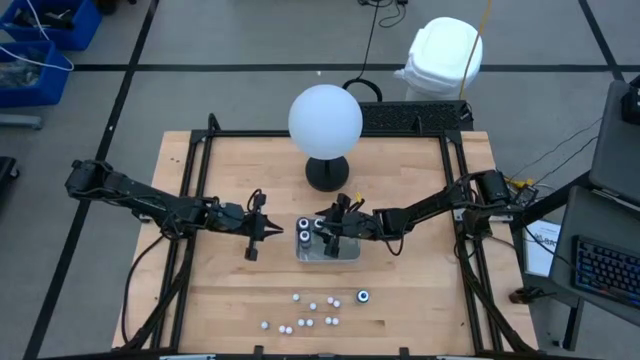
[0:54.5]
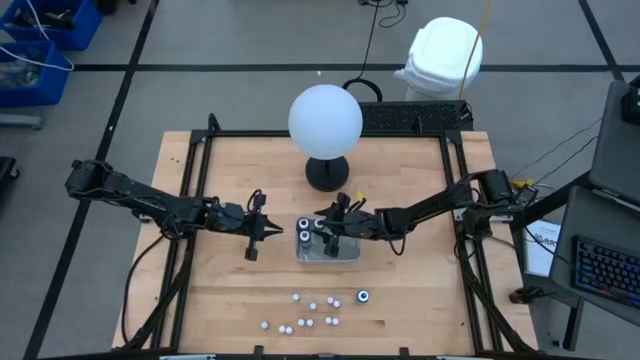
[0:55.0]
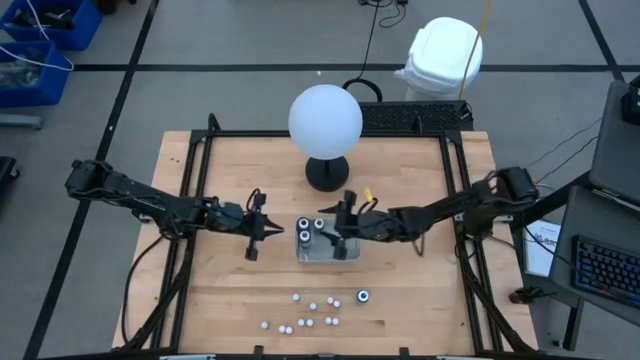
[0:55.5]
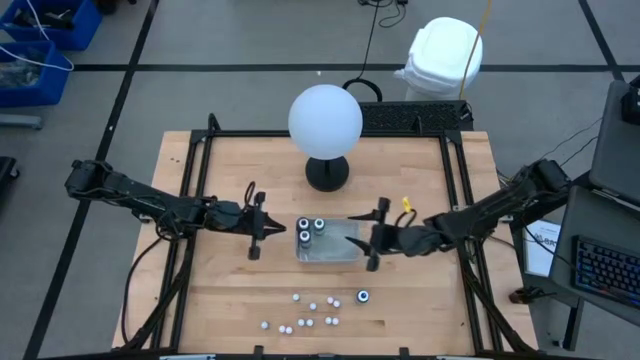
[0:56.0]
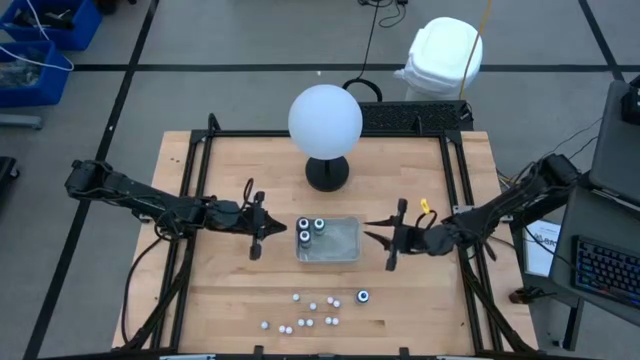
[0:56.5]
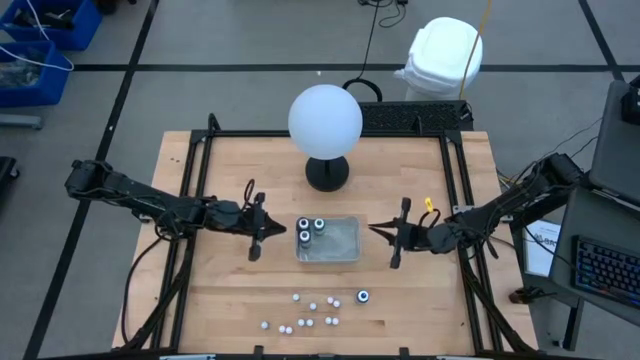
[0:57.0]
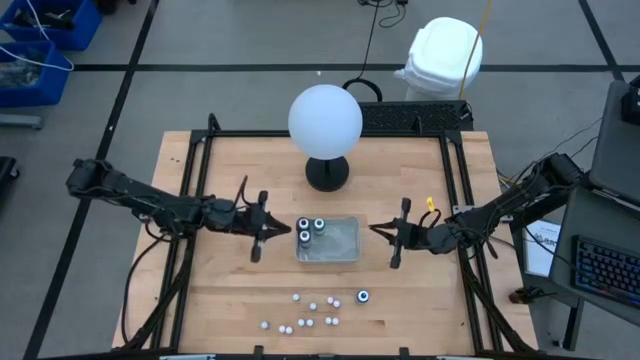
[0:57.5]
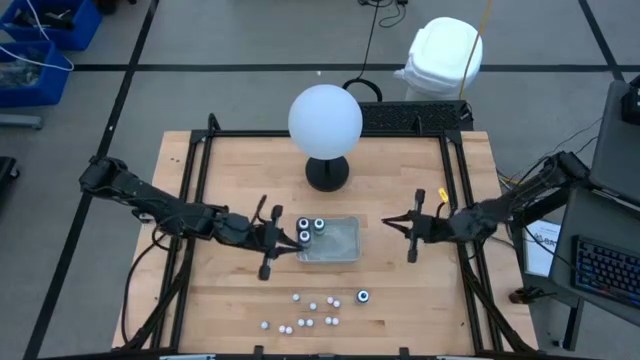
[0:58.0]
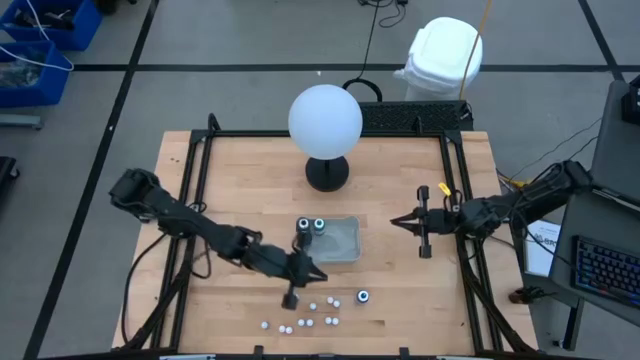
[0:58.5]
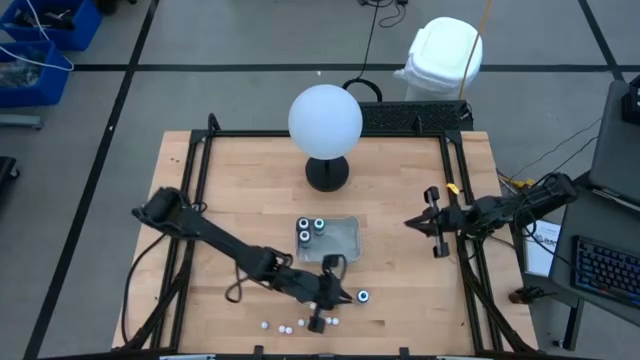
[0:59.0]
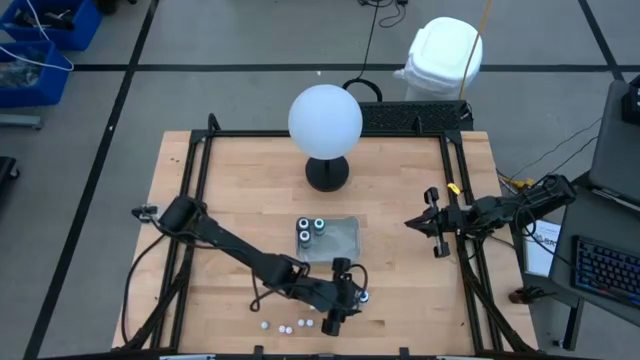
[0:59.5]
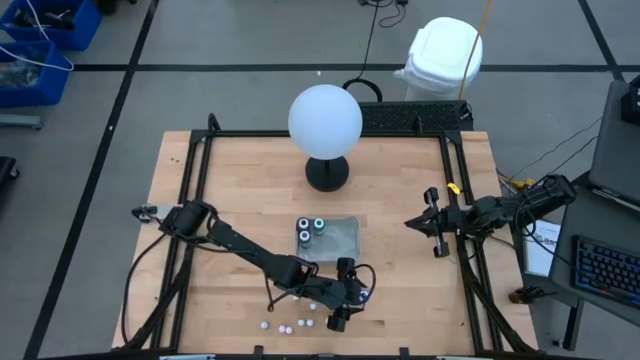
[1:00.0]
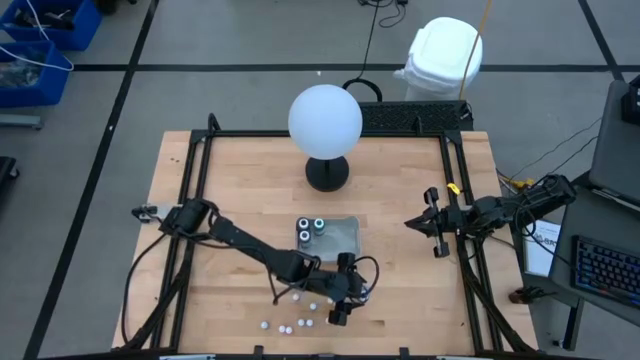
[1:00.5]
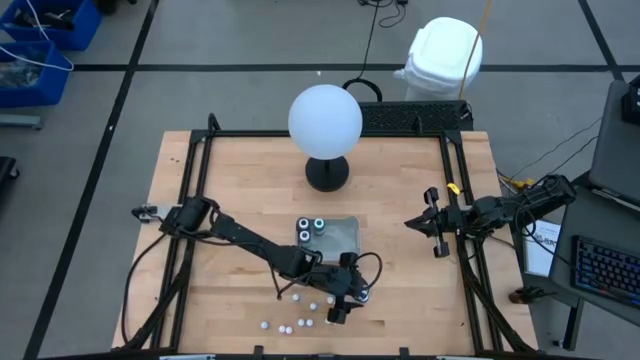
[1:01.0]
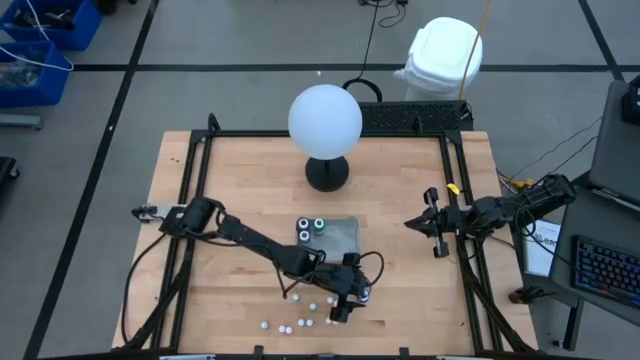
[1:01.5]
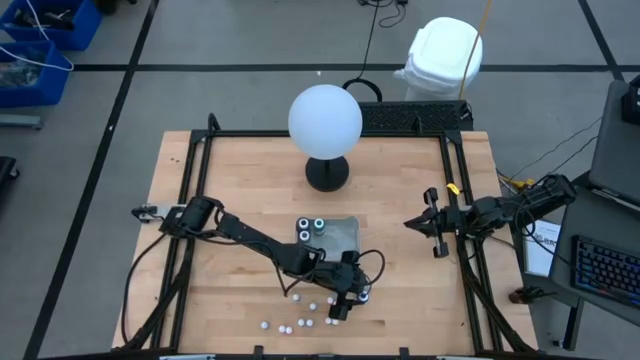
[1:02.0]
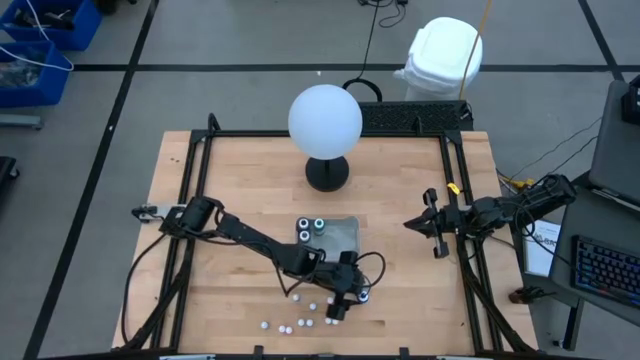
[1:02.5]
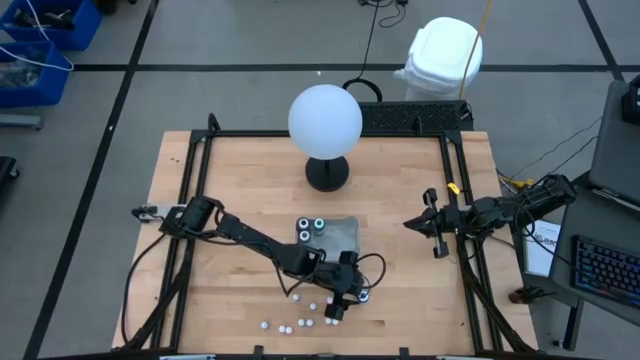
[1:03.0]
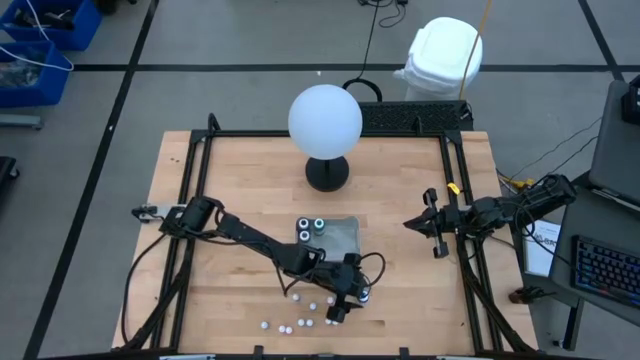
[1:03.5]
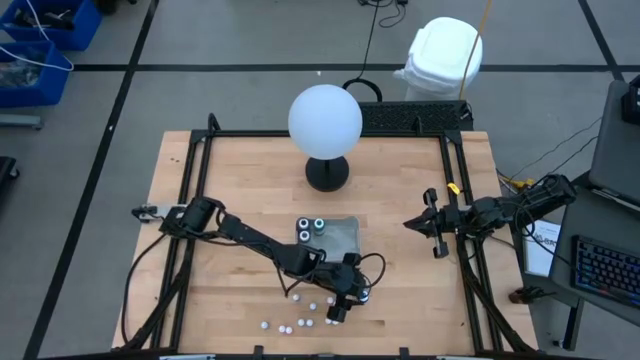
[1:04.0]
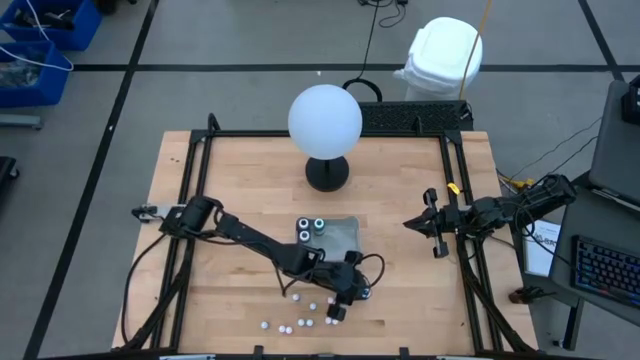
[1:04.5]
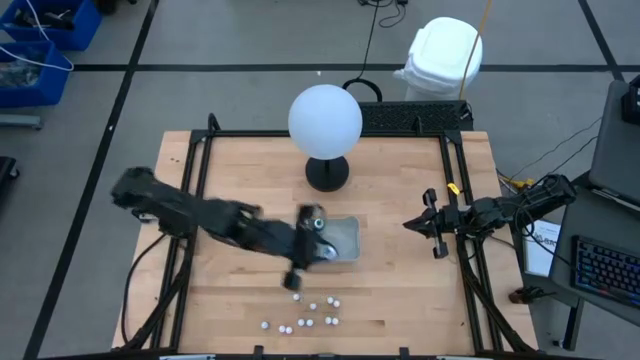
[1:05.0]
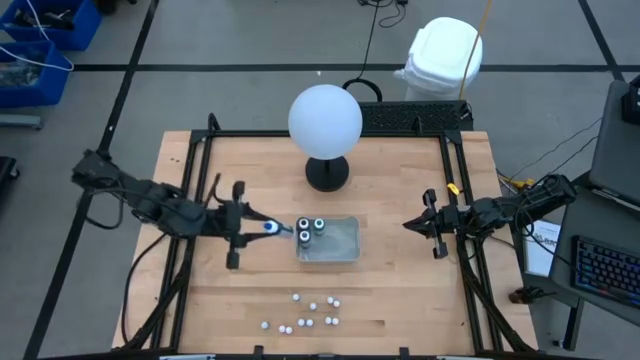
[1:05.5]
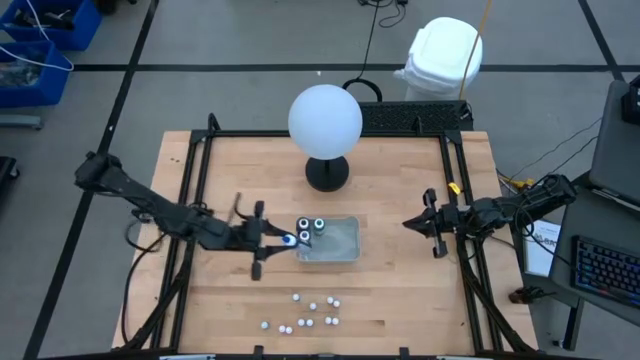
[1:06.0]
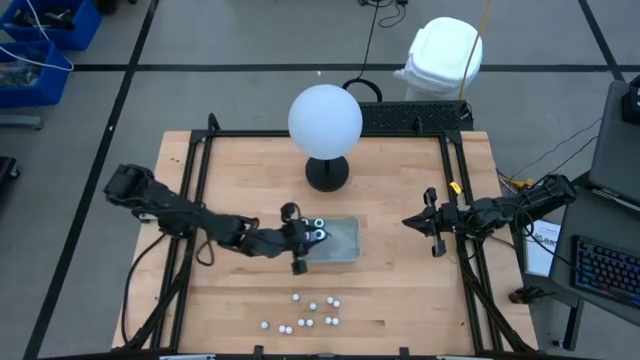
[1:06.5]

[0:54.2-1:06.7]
Task: Pick & Place food coloring
Put the large blue food coloring bottle into the gray bin

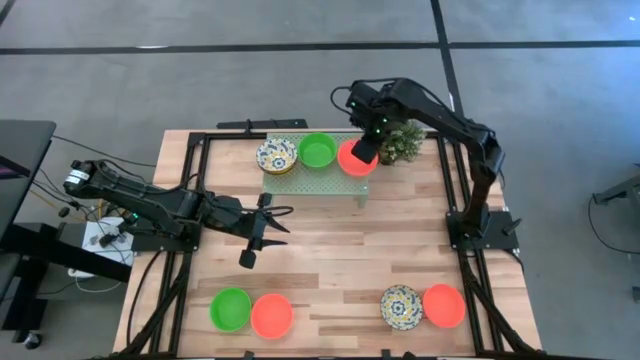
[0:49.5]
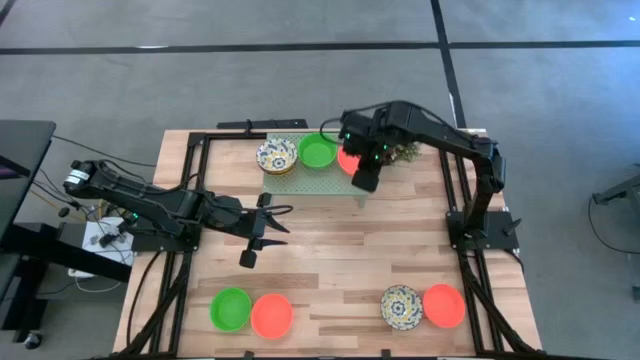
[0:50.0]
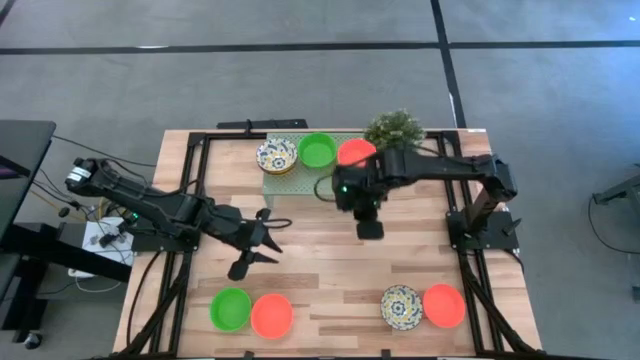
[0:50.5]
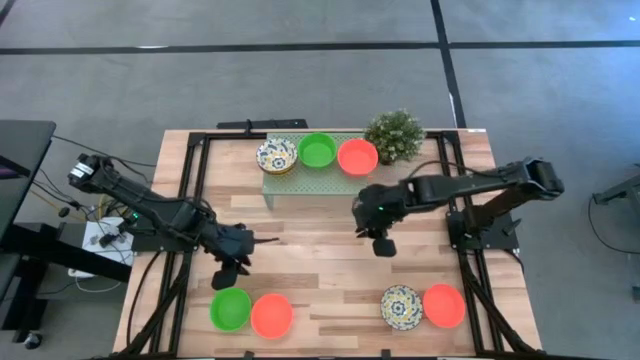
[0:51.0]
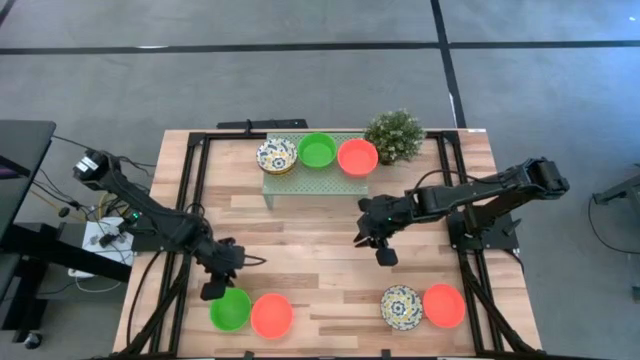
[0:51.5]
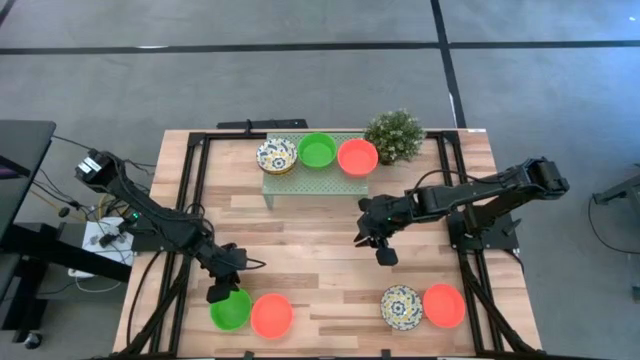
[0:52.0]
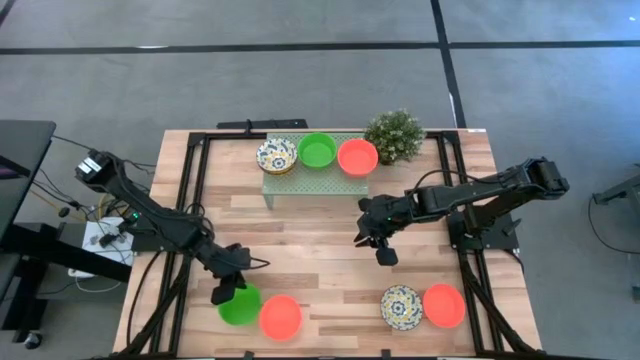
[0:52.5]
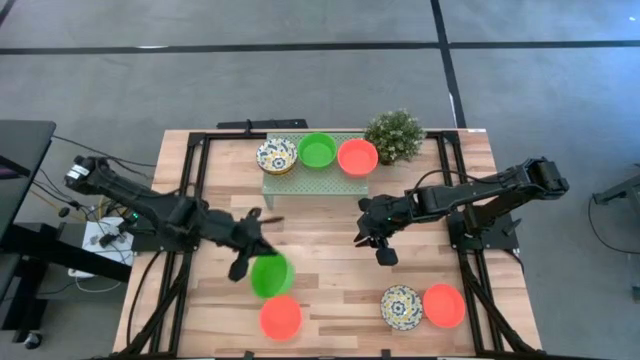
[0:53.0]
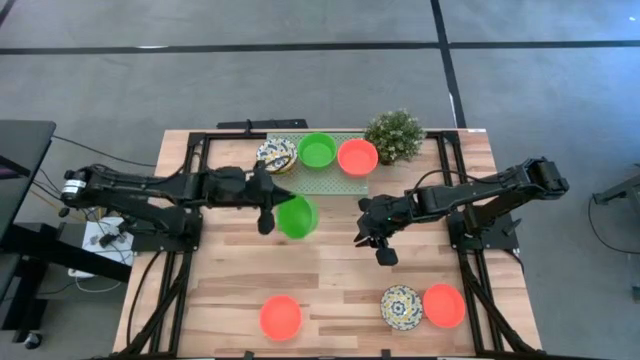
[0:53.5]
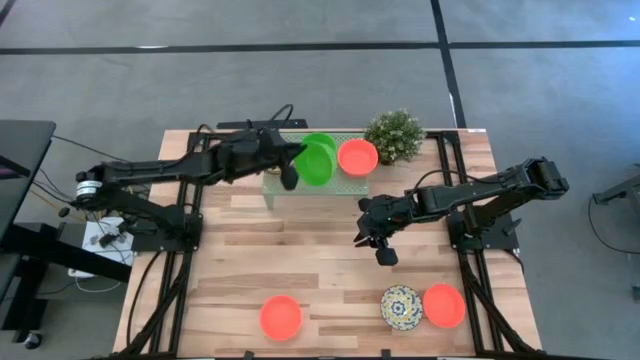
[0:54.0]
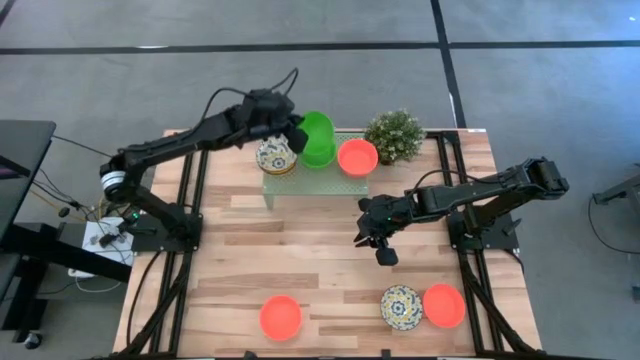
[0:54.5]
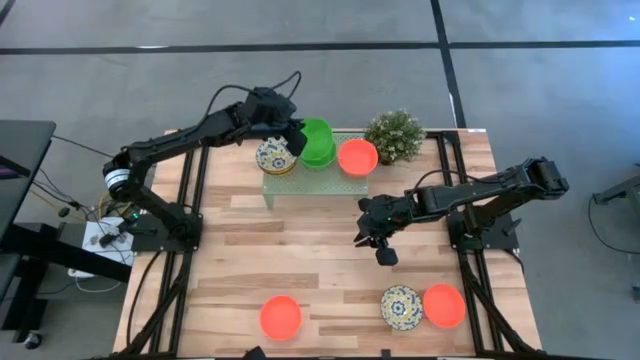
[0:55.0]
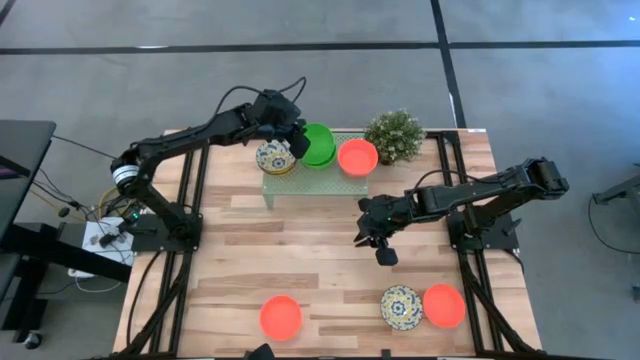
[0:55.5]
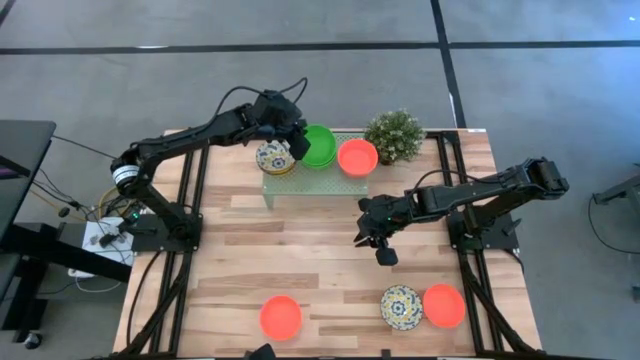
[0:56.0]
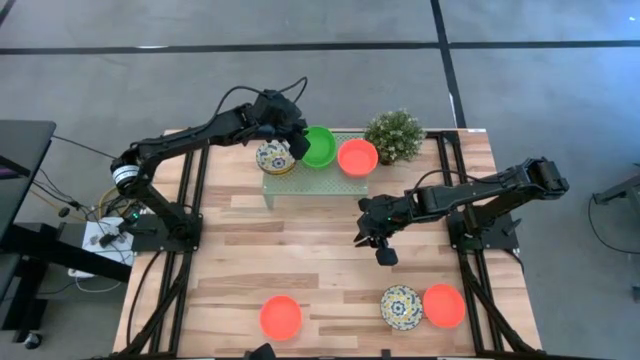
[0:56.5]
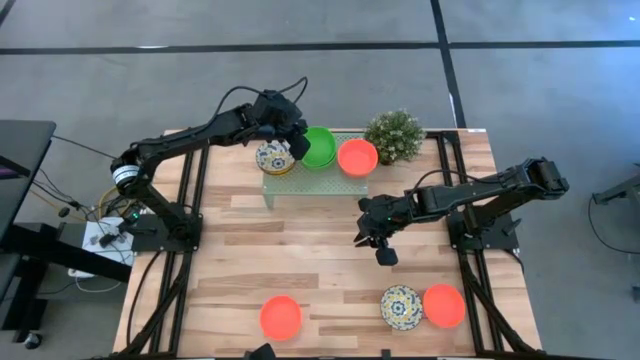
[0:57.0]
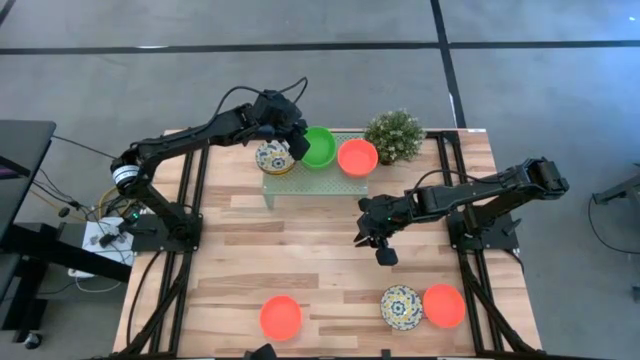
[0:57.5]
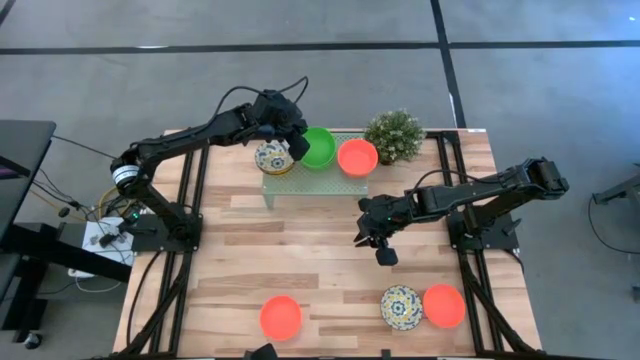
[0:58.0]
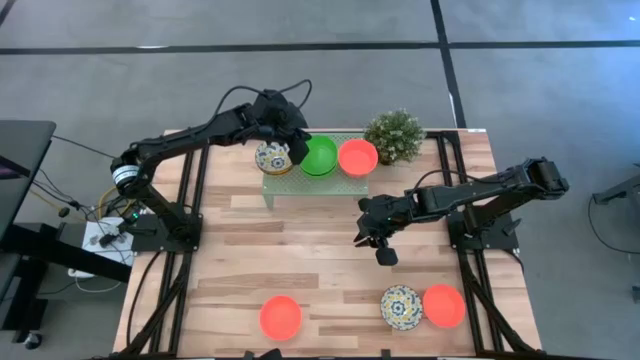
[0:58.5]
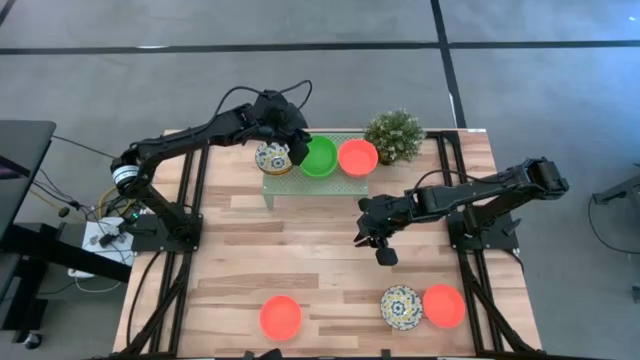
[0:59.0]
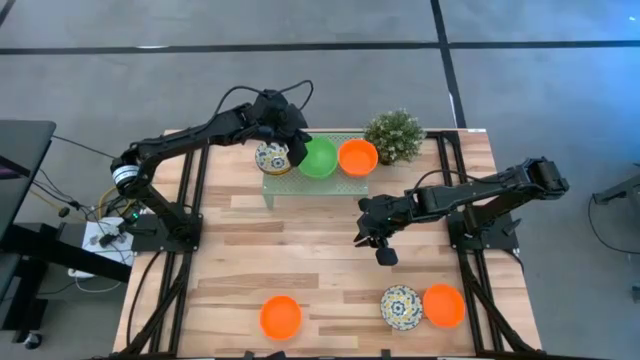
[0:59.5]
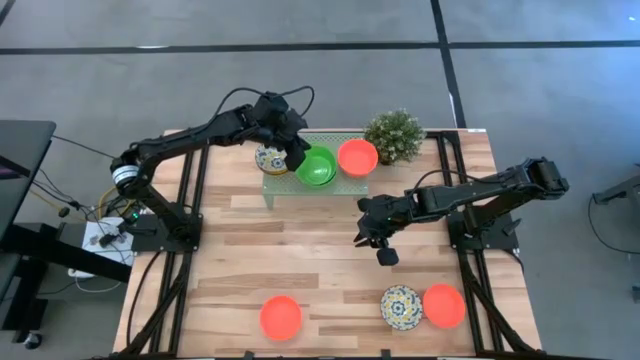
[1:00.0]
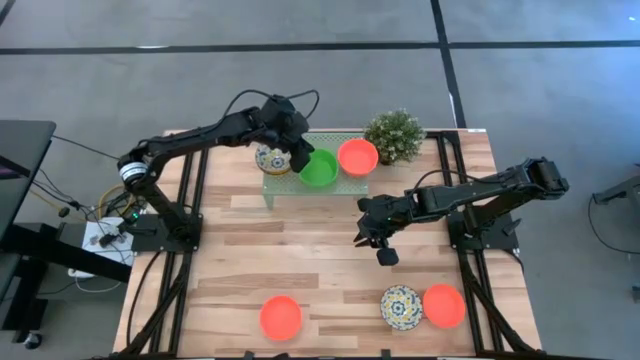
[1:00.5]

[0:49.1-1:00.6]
Task: Pick & Place Mini bowls
Stack the green bowl on the green bowls on the shelf
